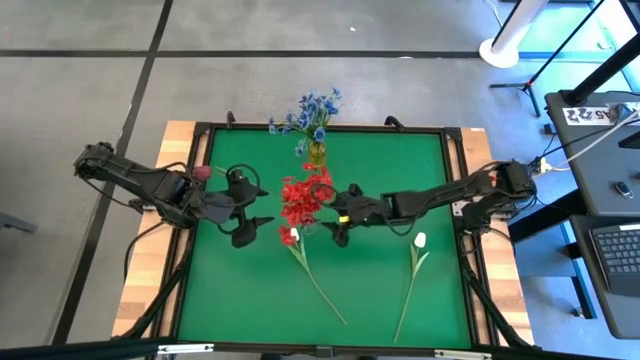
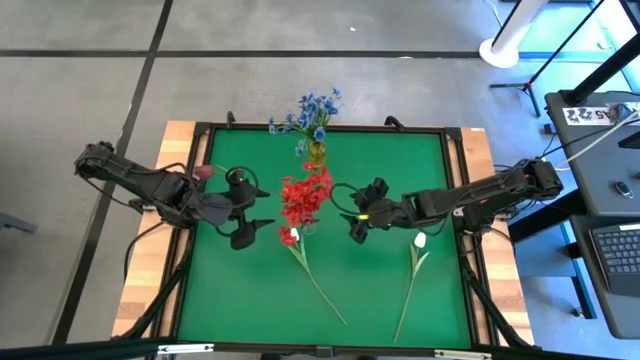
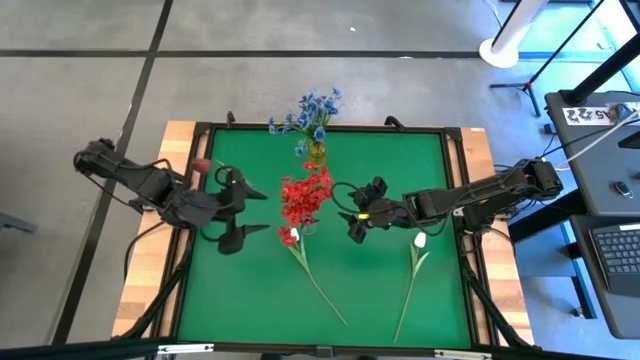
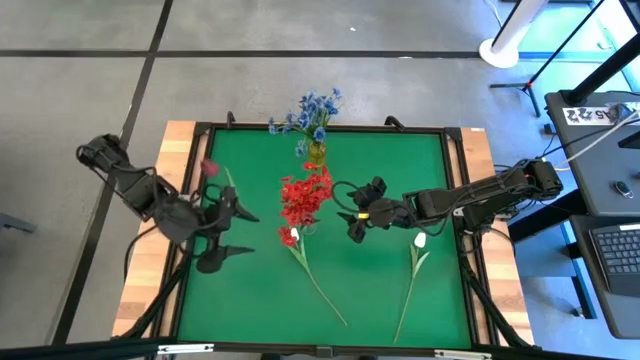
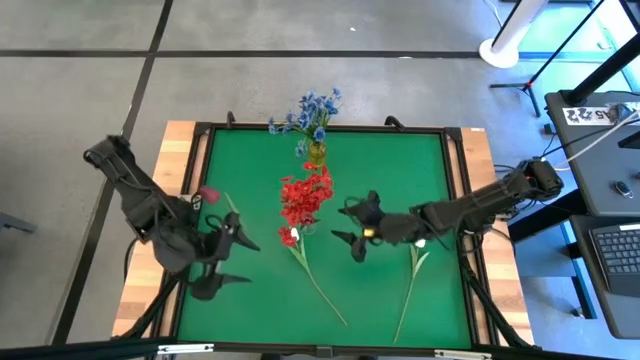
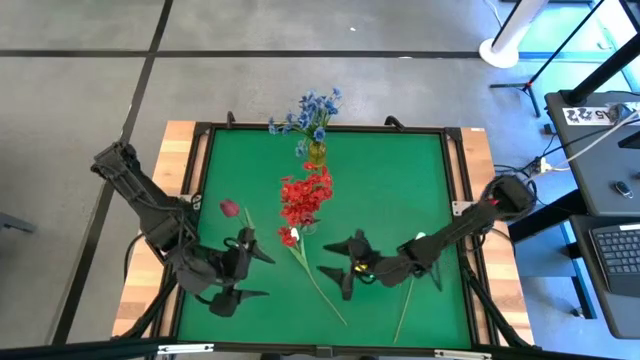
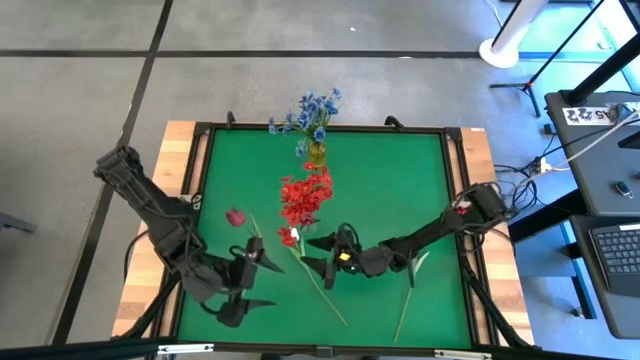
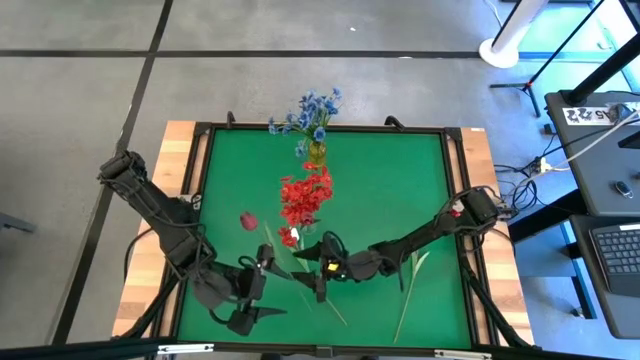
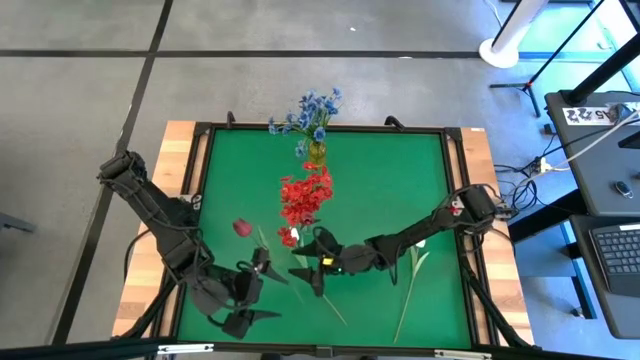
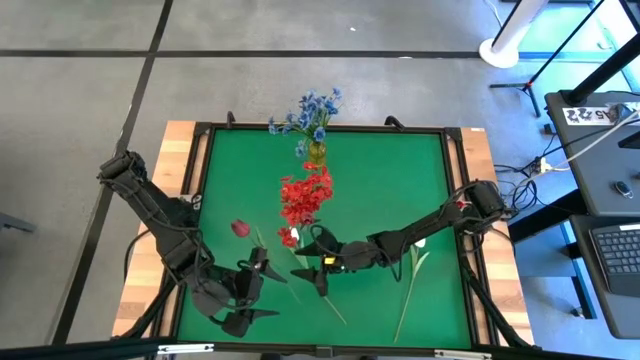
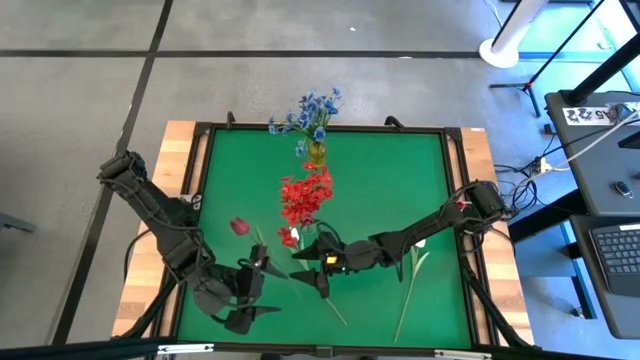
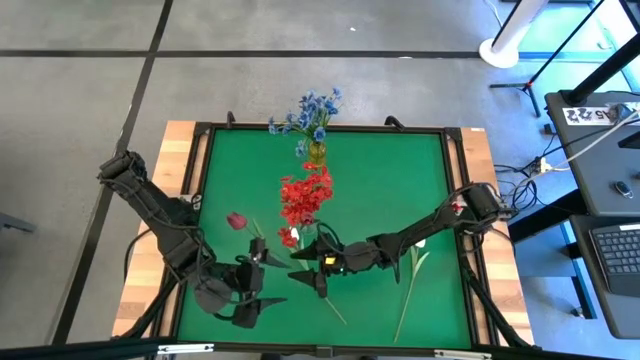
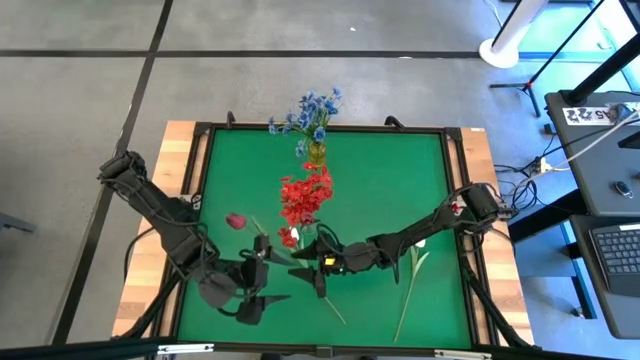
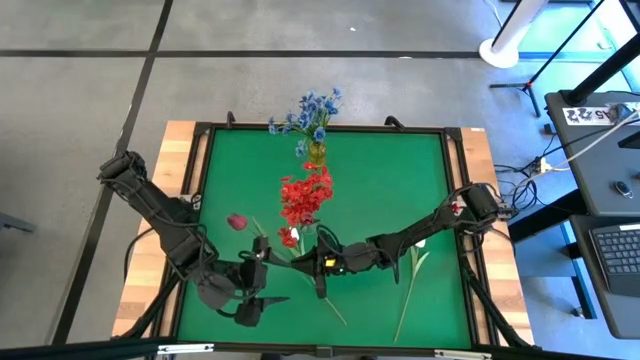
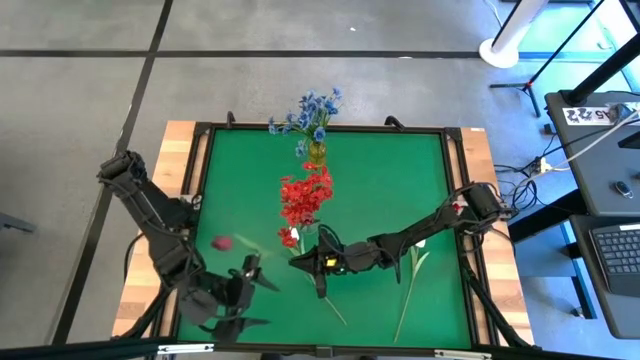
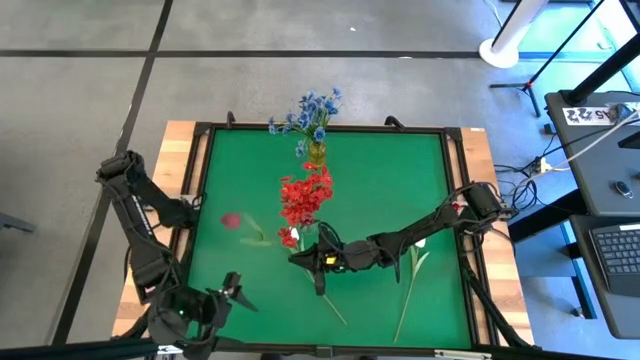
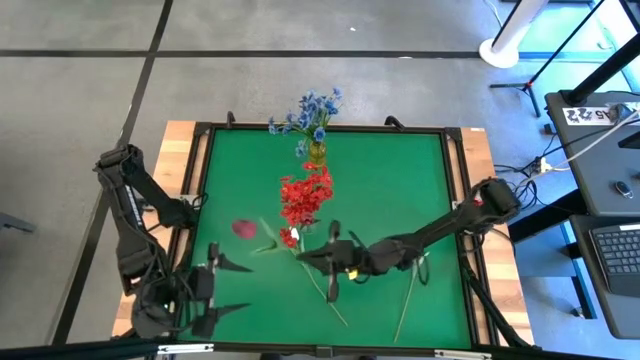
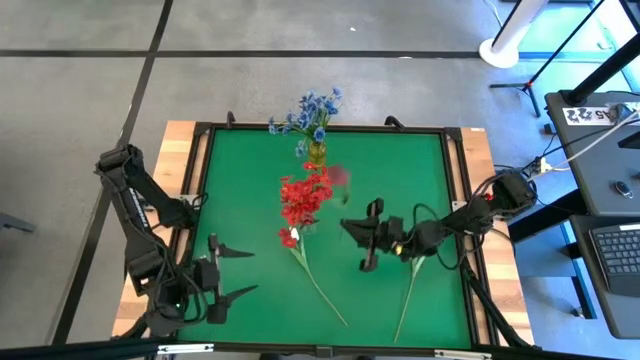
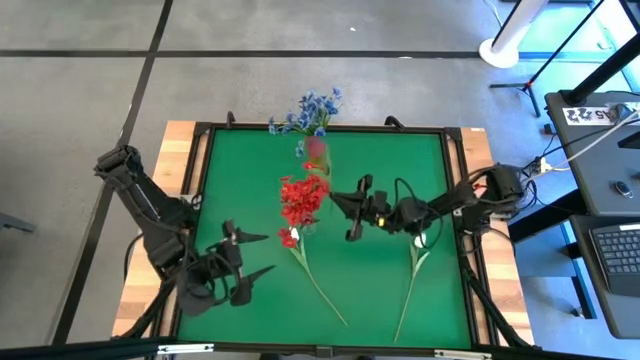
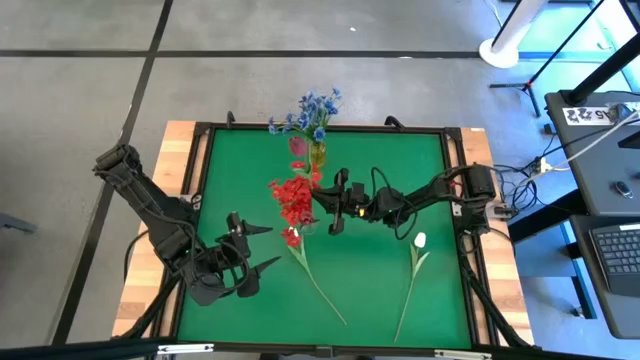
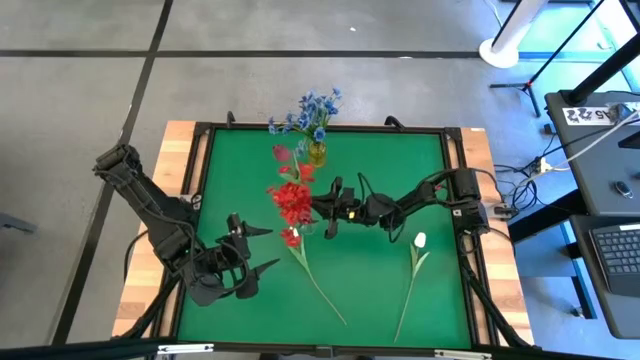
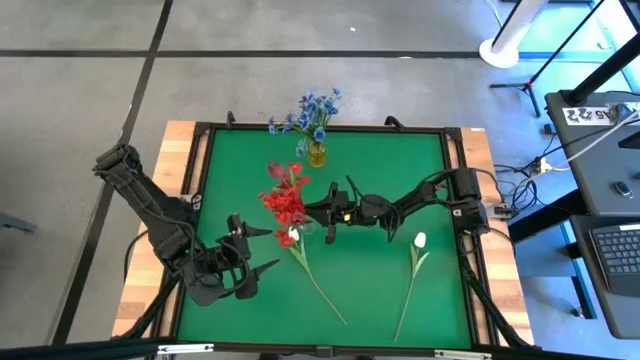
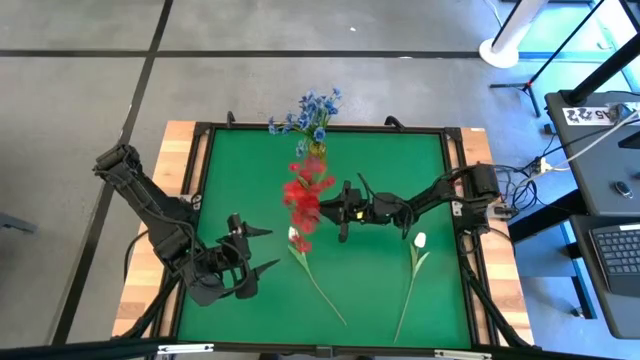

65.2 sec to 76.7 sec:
Task: Sort flowers into vase by color
Put the white blue flower into the transparent vase

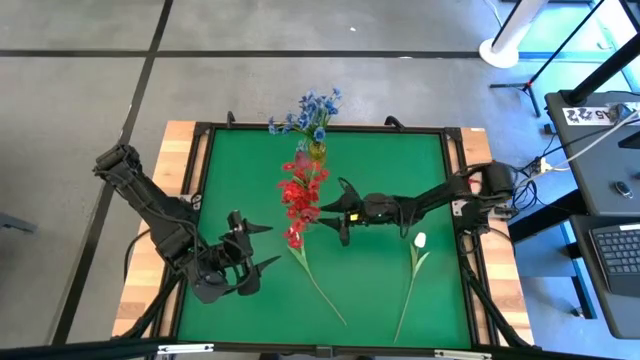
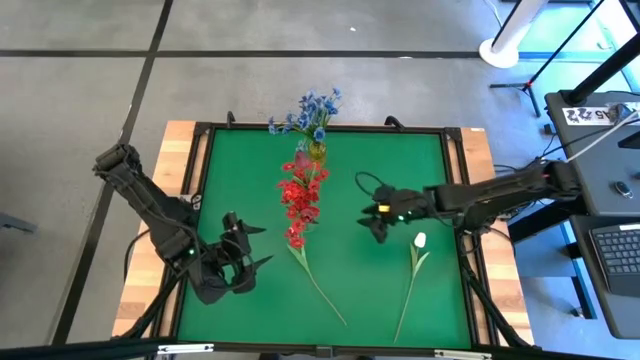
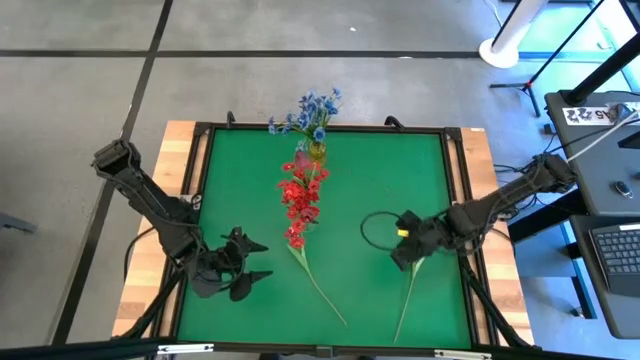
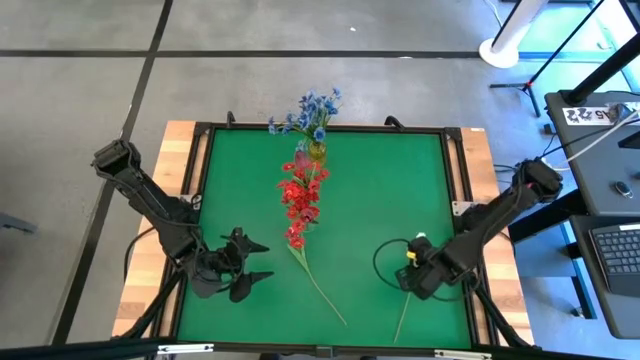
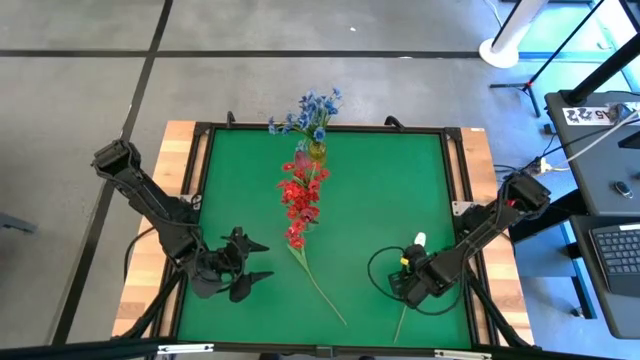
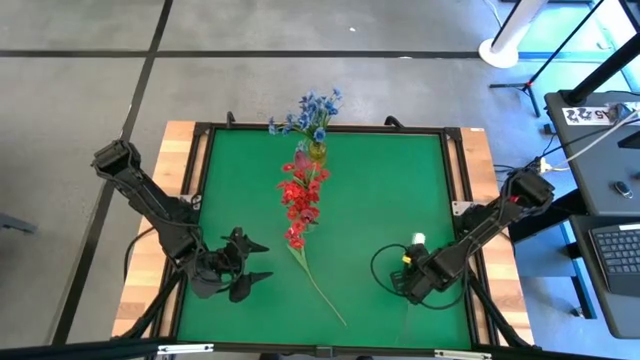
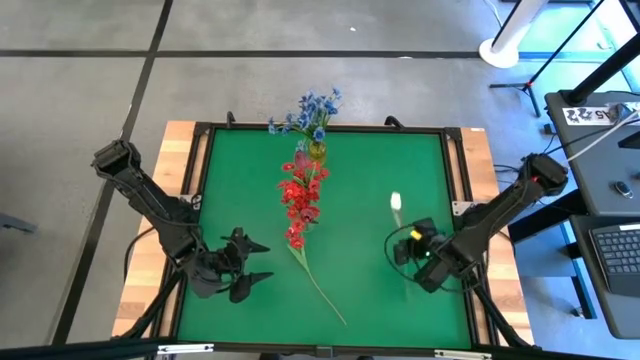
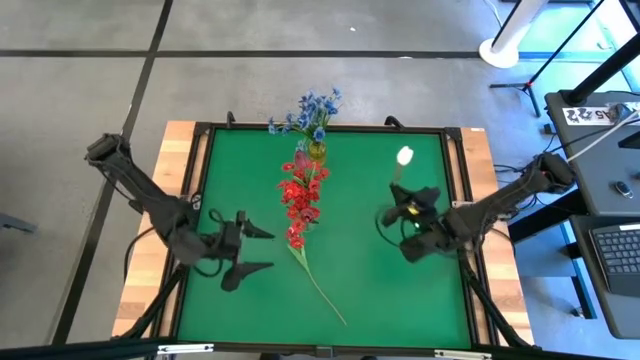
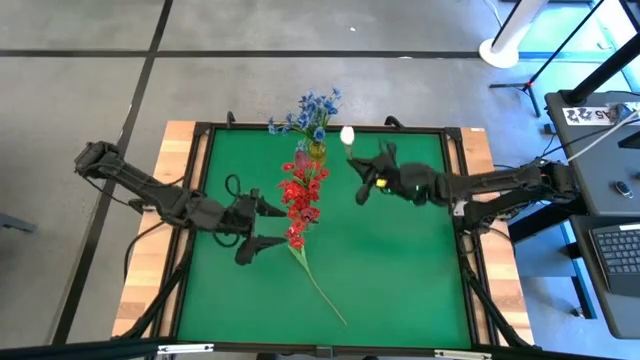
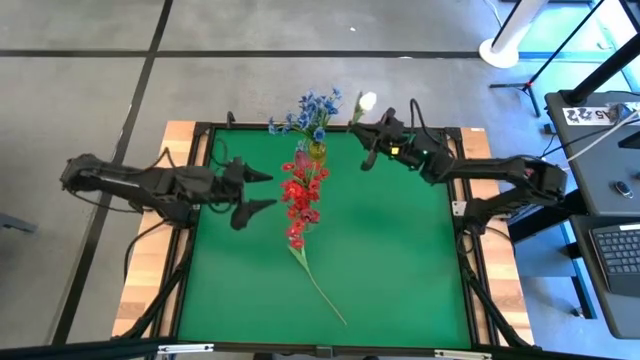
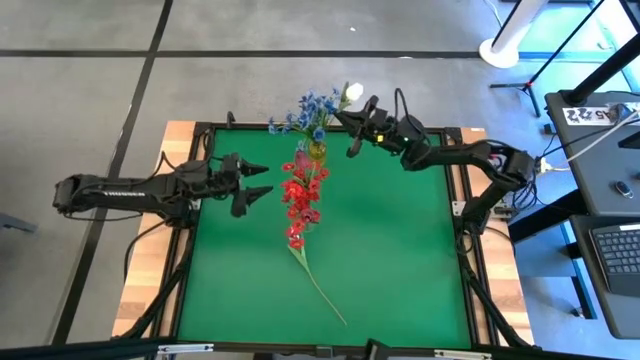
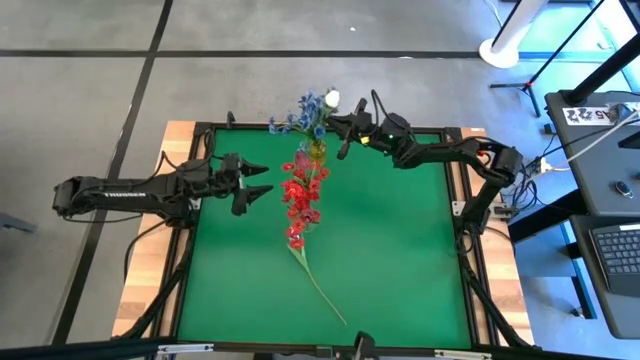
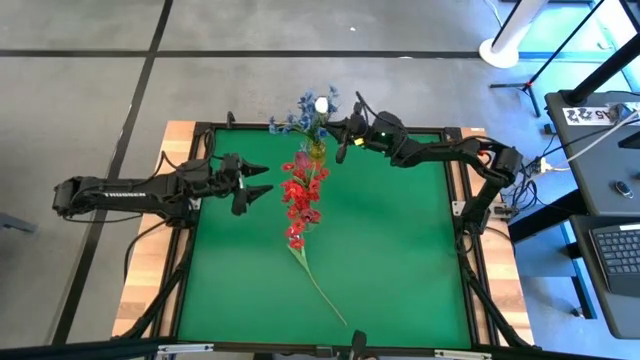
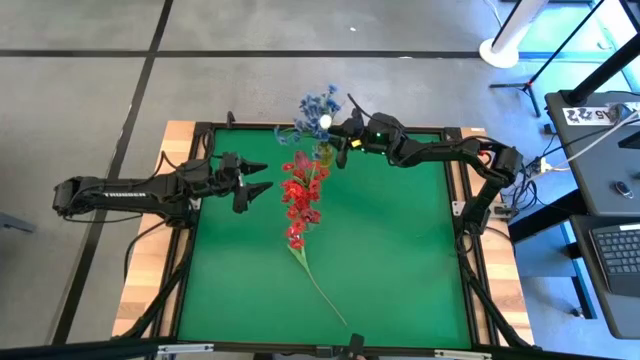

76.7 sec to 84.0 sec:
Put the white blue flower into the yellow vase

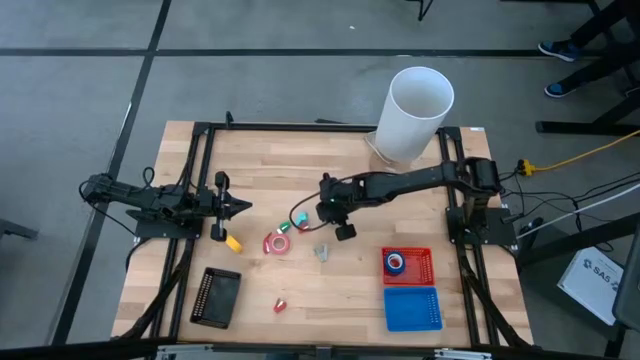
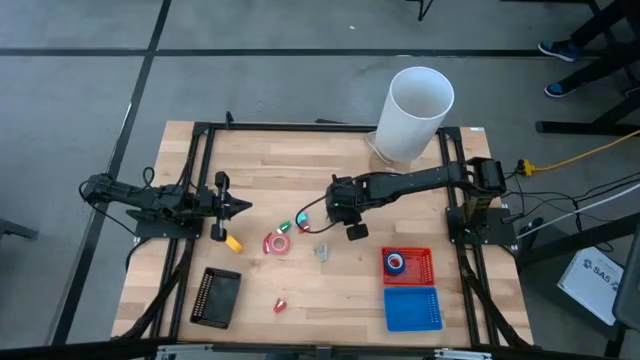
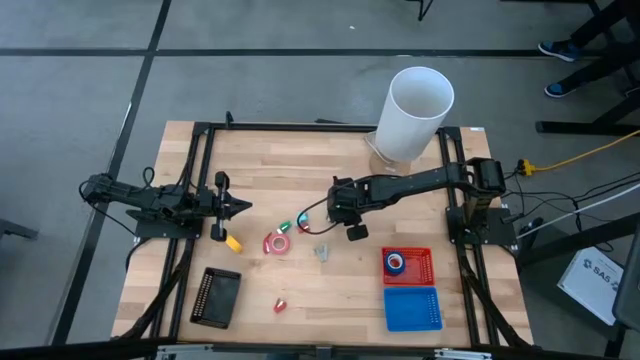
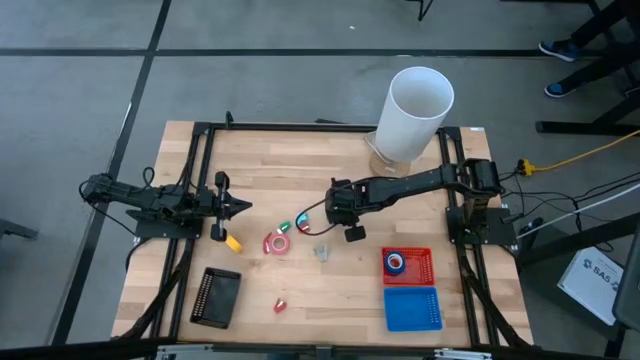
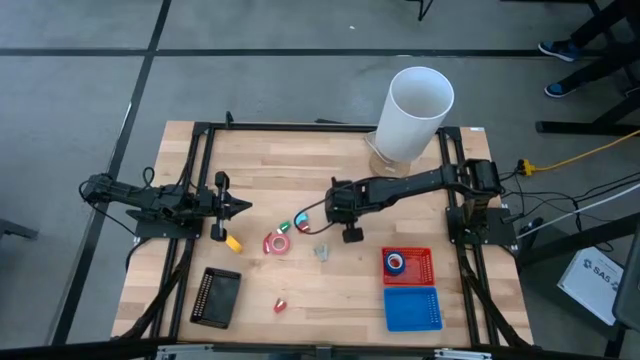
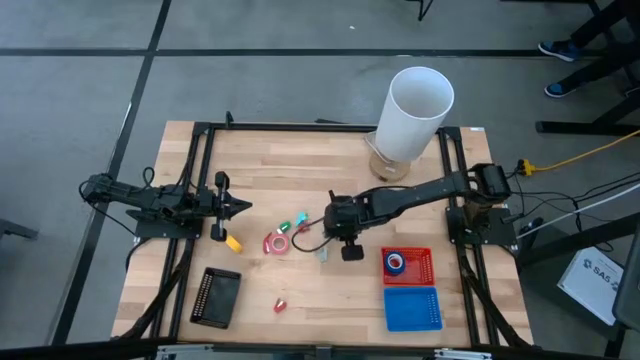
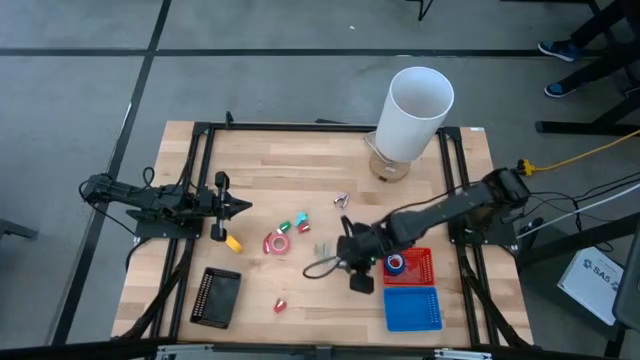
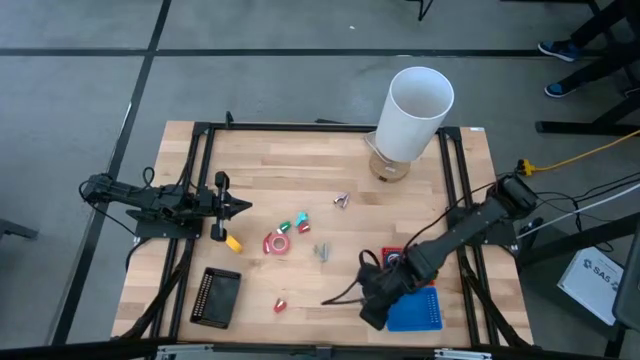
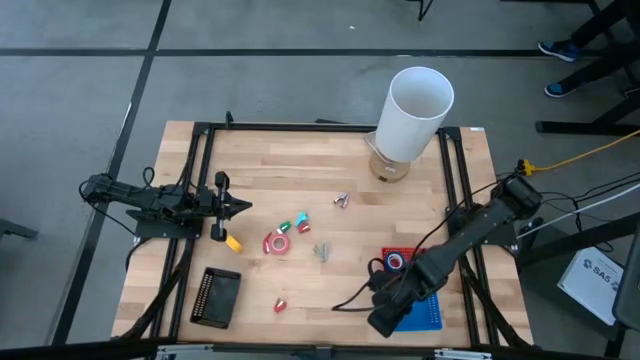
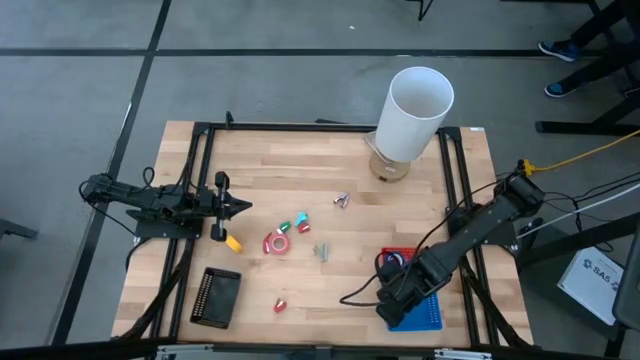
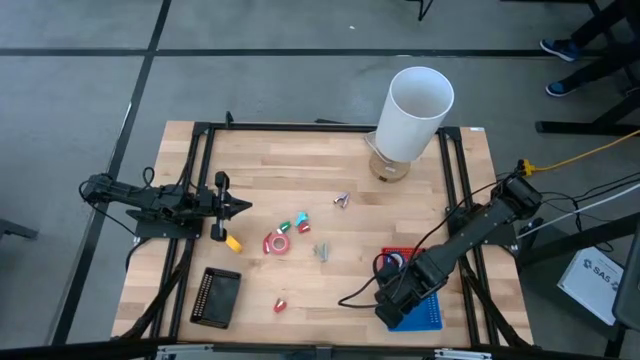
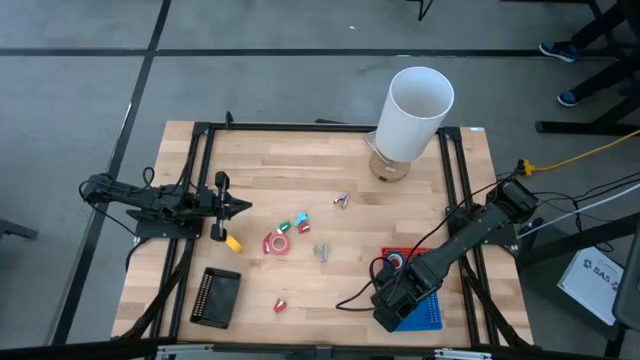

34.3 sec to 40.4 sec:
Task: Pick and place Stapler, Stapler remover, tape
Put the black staple remover into the blue basket
